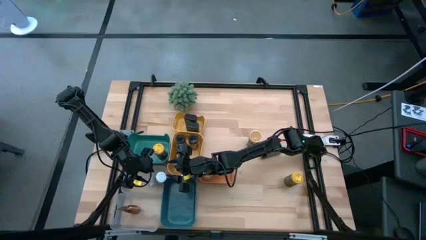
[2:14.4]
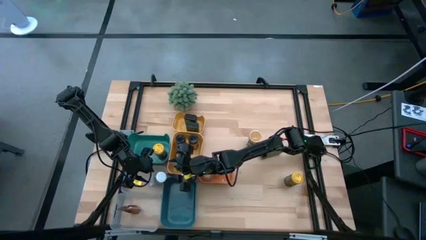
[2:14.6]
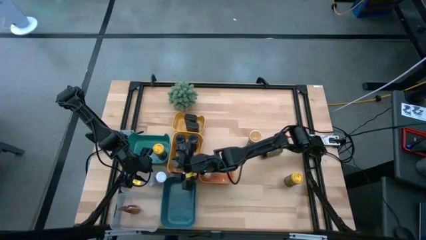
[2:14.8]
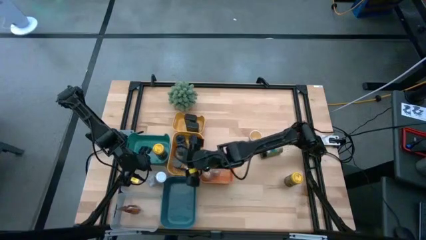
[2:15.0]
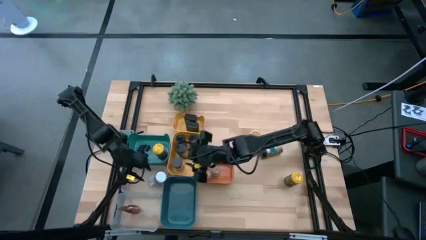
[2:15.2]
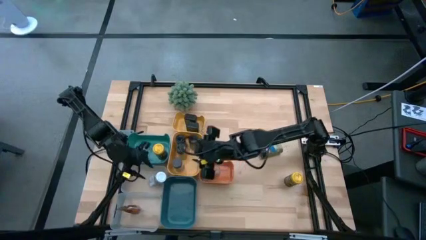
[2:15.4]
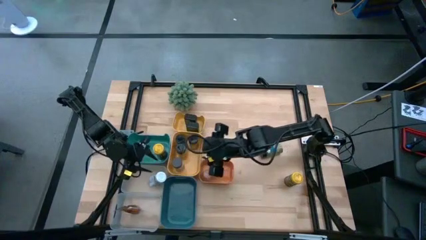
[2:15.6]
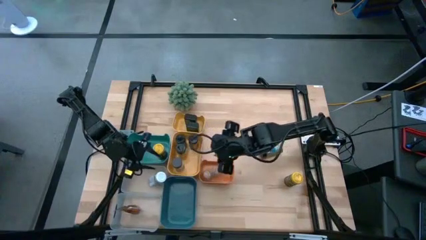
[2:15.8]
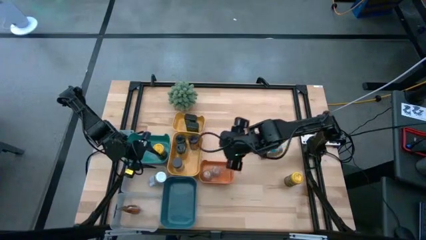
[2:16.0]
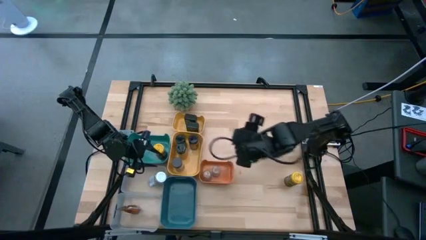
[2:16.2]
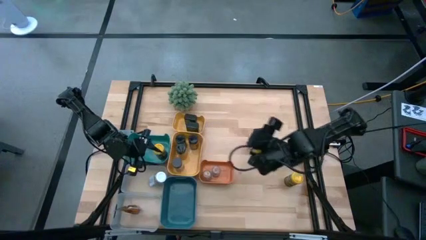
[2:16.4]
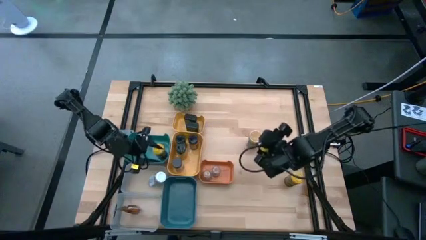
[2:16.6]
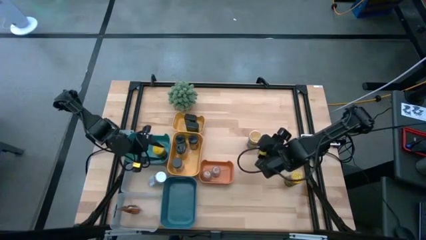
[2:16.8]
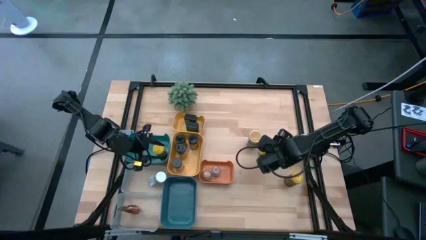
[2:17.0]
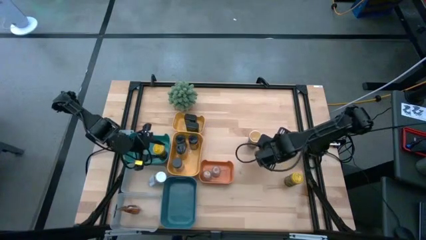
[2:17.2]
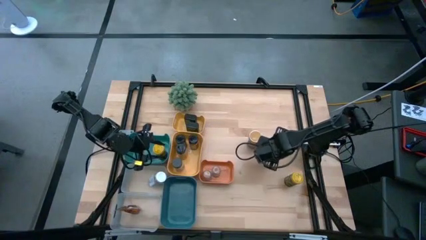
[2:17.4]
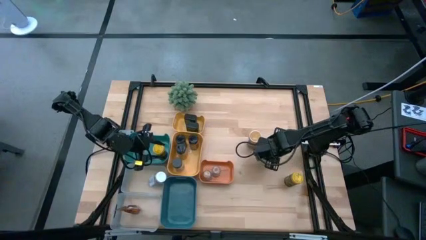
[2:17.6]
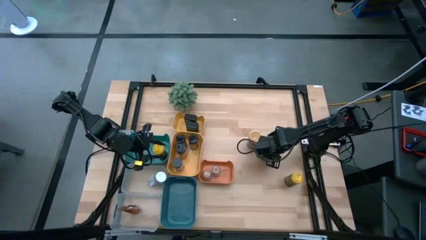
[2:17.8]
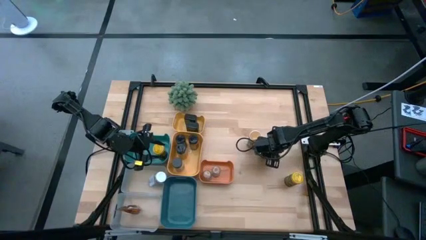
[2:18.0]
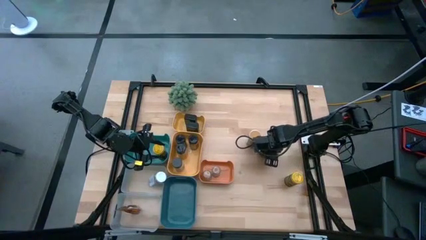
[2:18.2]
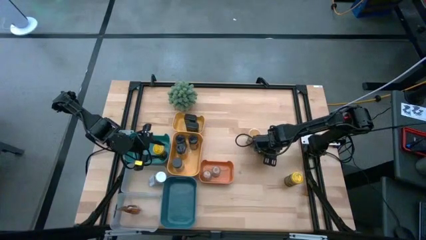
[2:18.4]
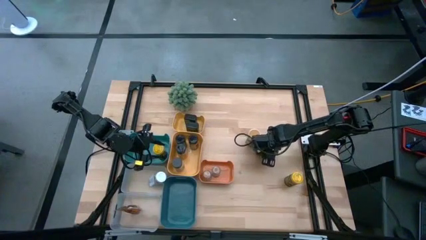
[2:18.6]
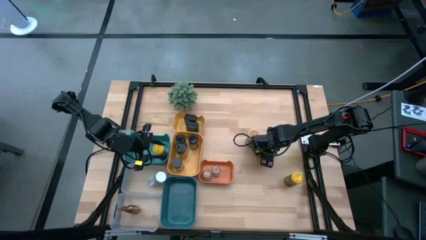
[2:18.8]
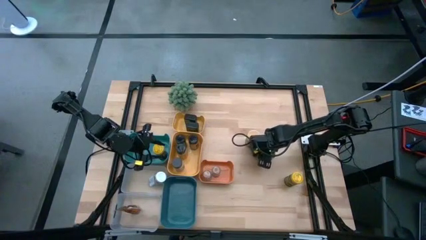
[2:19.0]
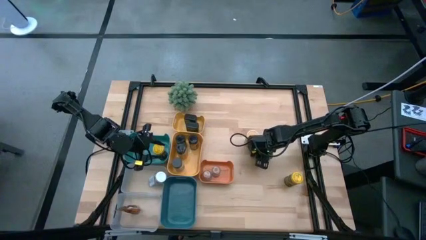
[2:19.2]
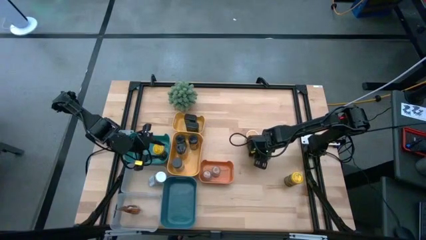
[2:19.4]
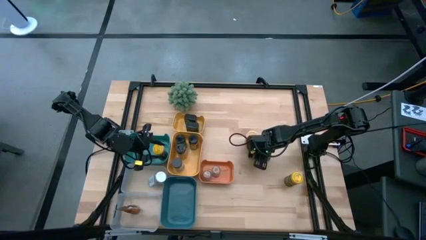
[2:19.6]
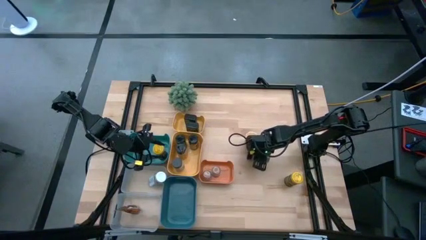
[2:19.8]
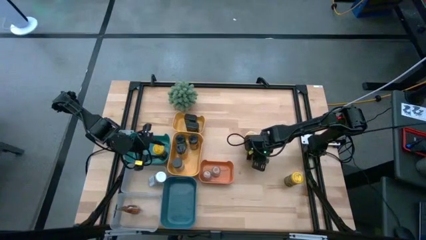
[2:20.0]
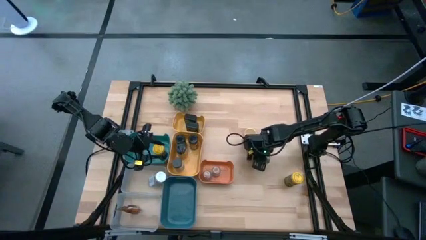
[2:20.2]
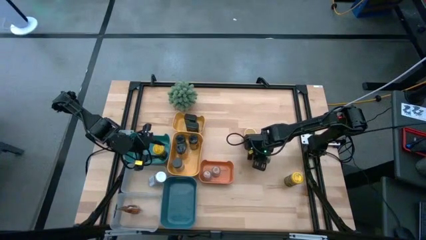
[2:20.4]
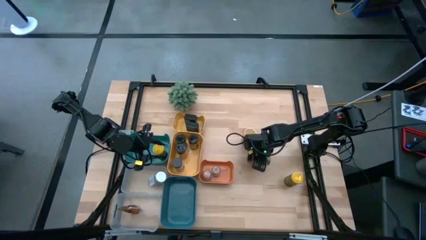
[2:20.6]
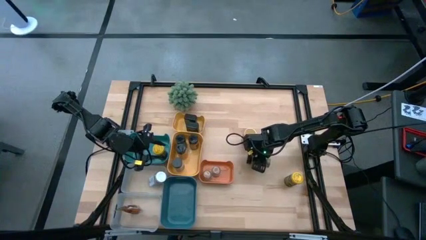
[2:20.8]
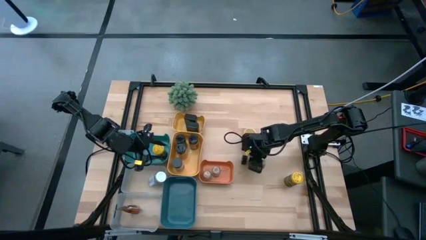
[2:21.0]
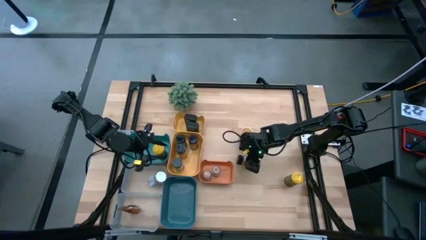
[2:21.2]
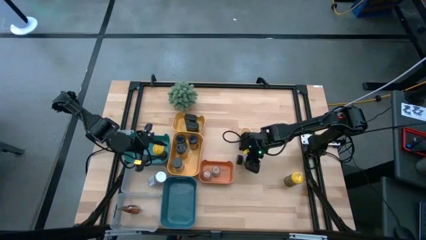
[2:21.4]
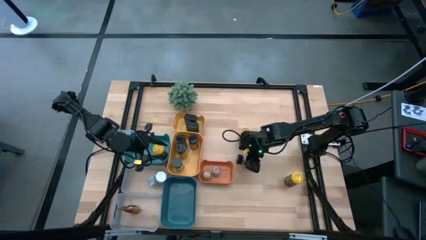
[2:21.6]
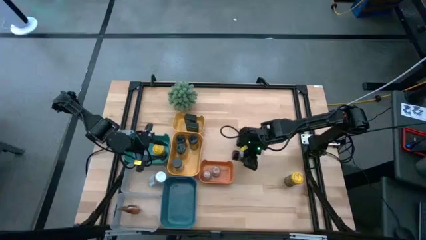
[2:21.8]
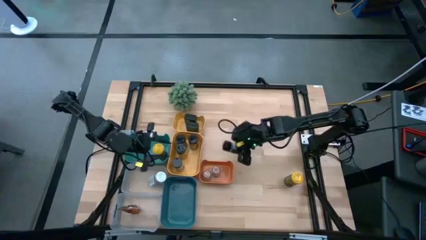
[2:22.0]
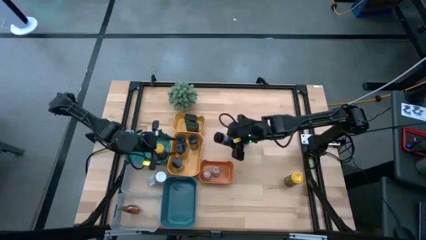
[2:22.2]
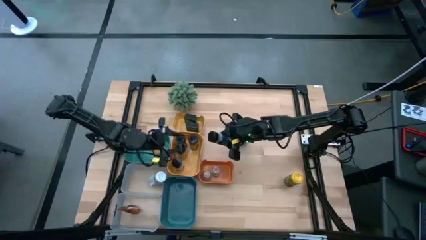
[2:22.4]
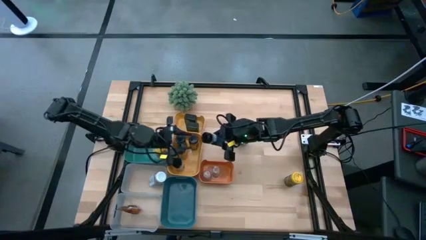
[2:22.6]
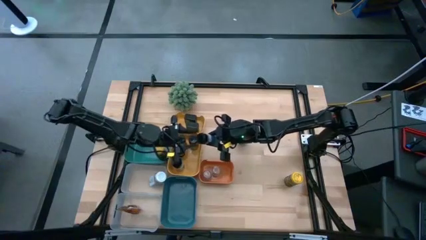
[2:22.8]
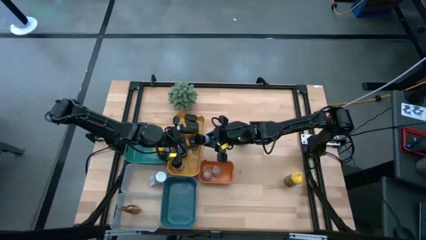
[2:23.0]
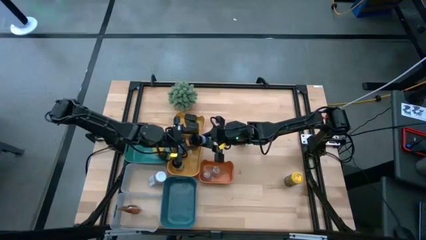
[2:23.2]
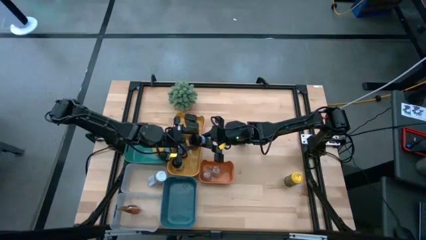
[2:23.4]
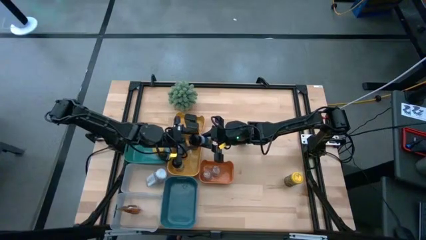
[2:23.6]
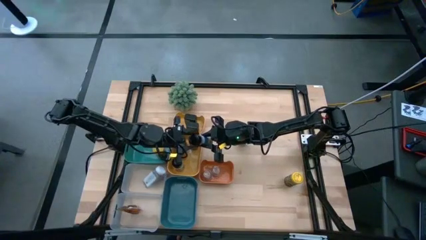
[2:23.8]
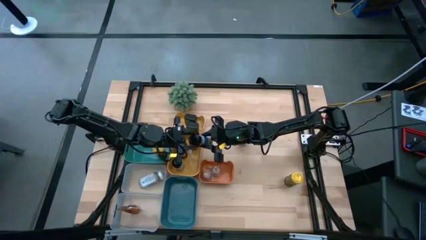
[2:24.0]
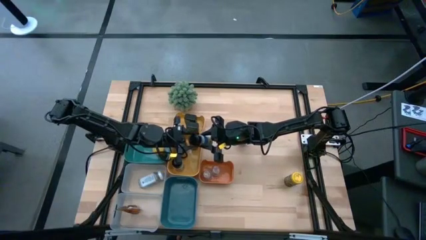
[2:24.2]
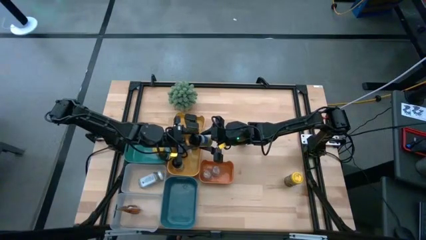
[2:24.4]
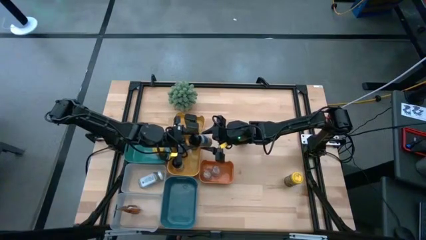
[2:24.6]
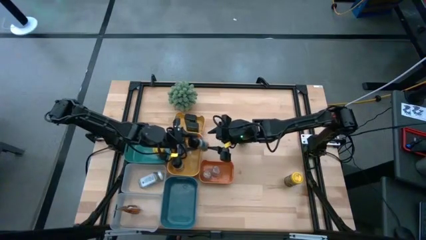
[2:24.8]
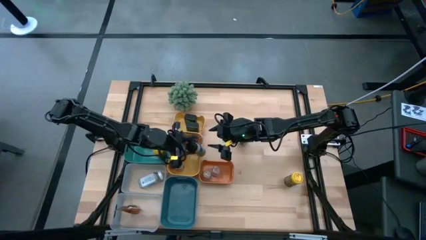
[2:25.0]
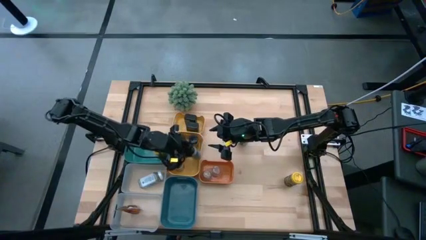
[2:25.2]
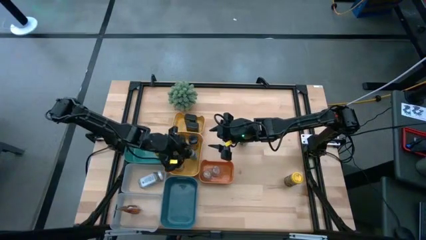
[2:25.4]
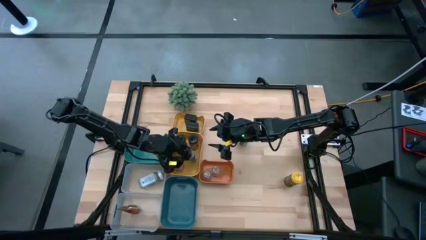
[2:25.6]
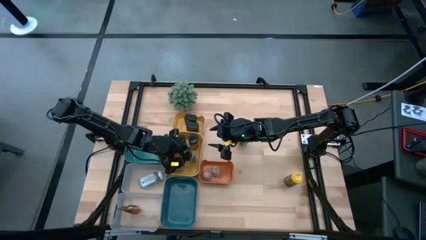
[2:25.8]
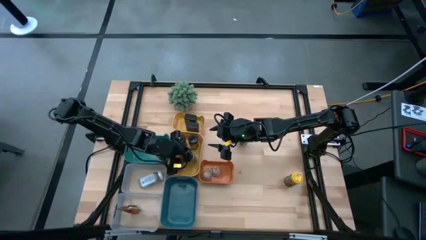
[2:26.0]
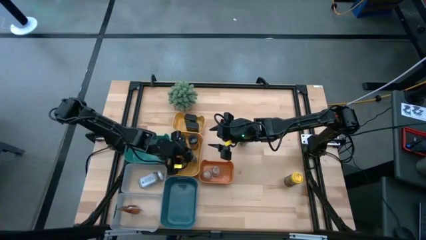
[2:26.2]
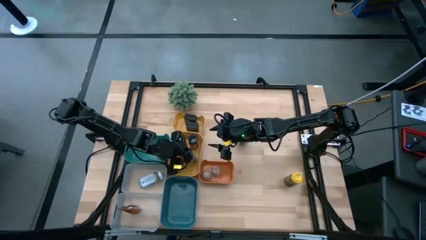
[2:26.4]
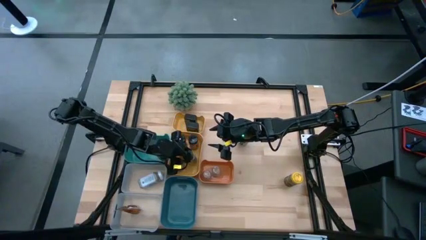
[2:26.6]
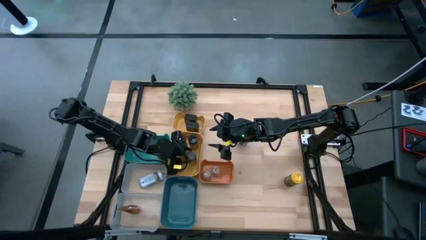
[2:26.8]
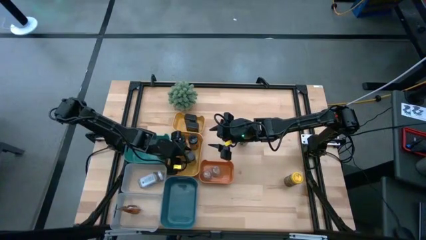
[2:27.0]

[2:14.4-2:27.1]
Task: Sort spices by type
Put the black seasoning bottle into the bottom yellow bin
